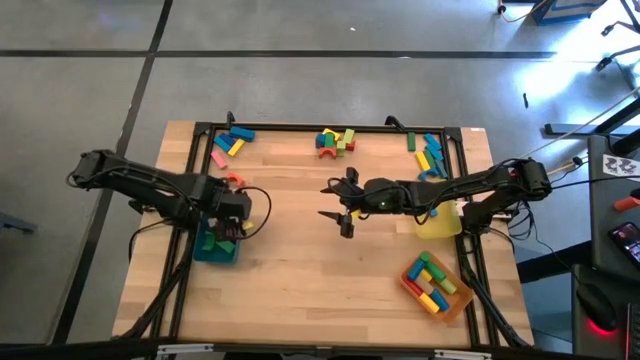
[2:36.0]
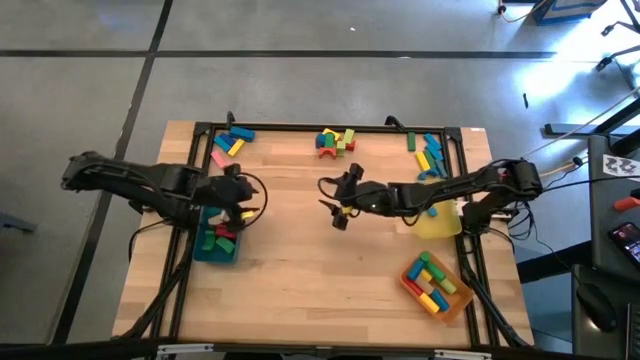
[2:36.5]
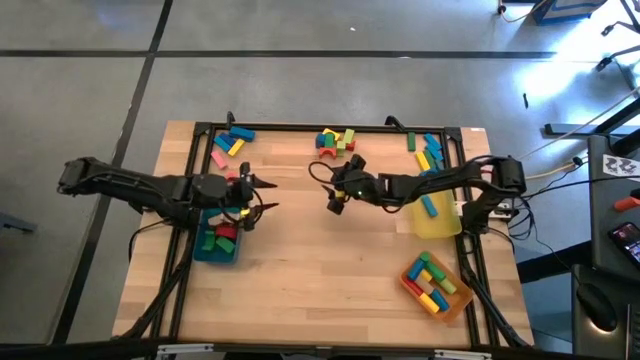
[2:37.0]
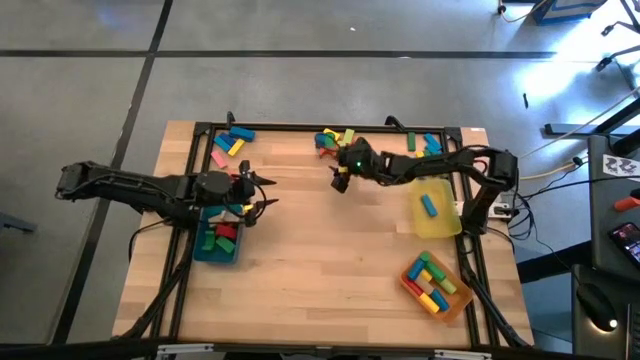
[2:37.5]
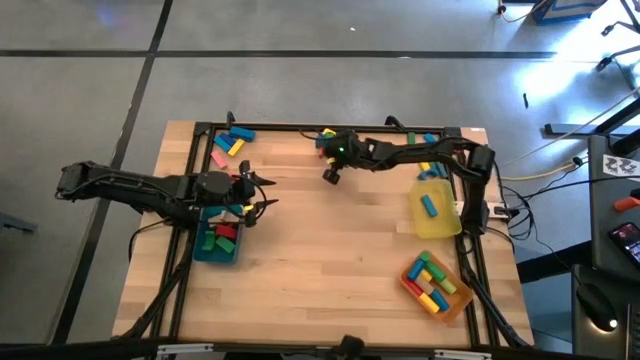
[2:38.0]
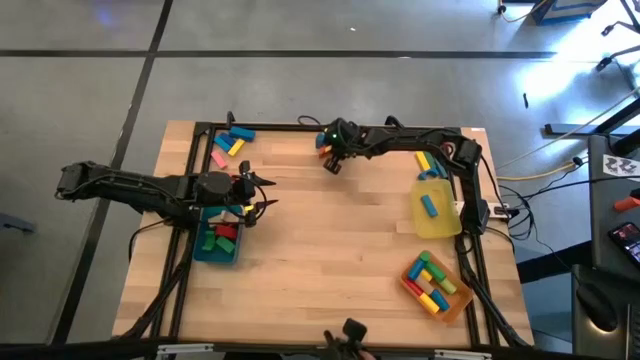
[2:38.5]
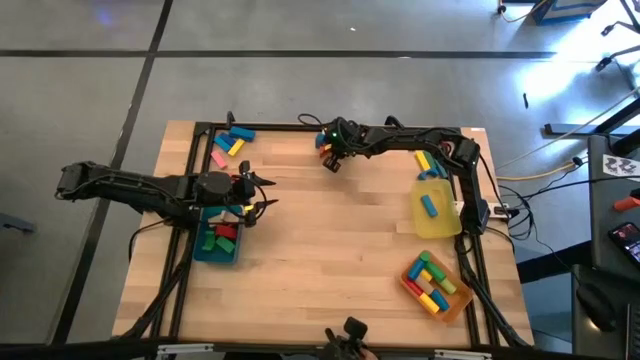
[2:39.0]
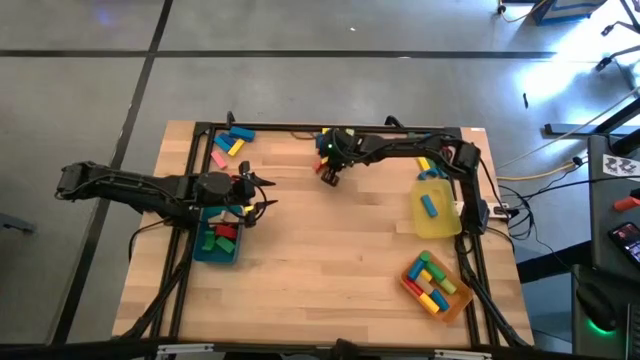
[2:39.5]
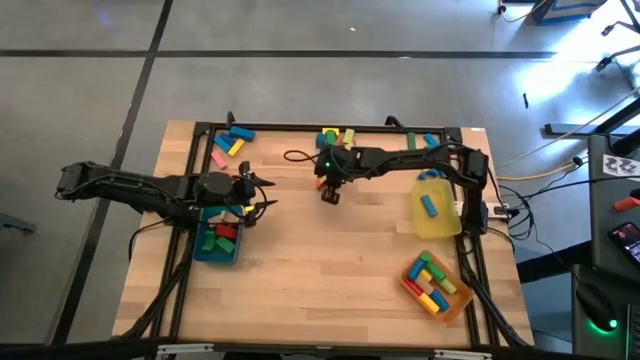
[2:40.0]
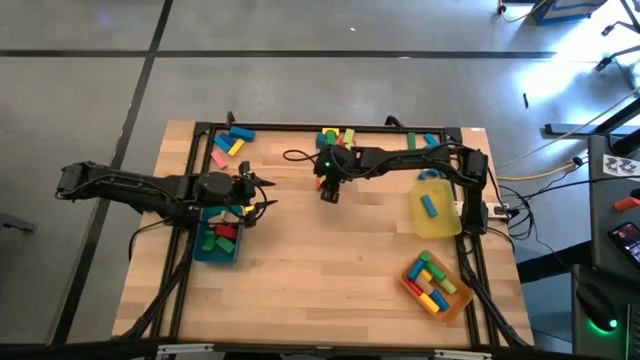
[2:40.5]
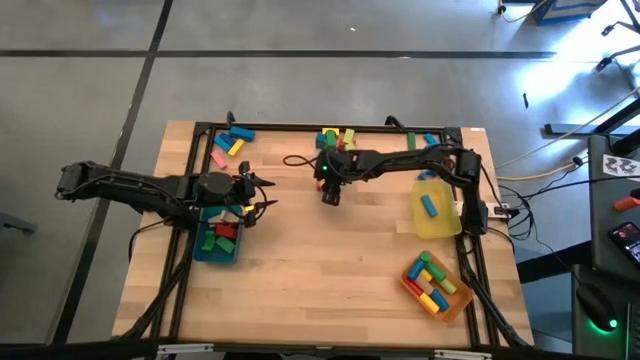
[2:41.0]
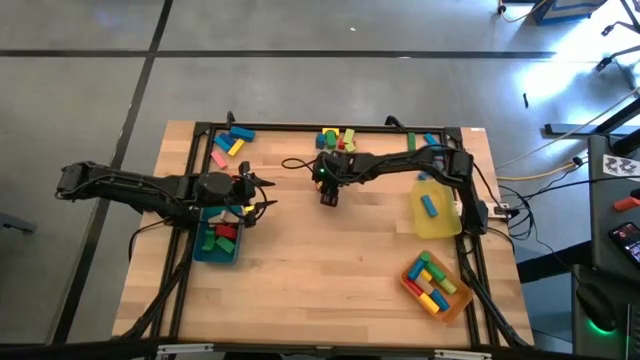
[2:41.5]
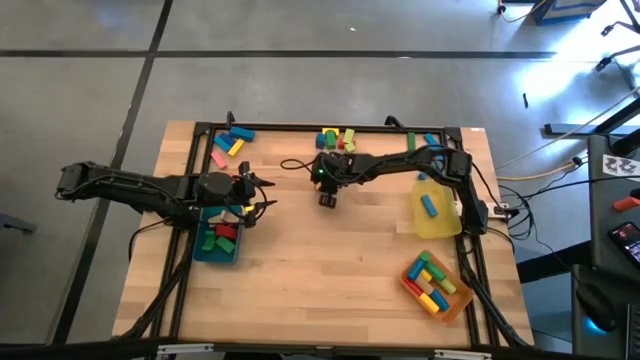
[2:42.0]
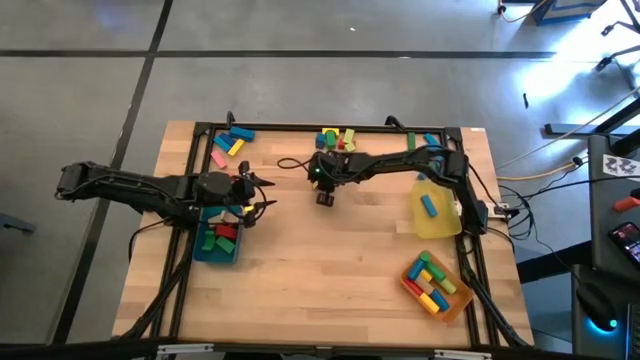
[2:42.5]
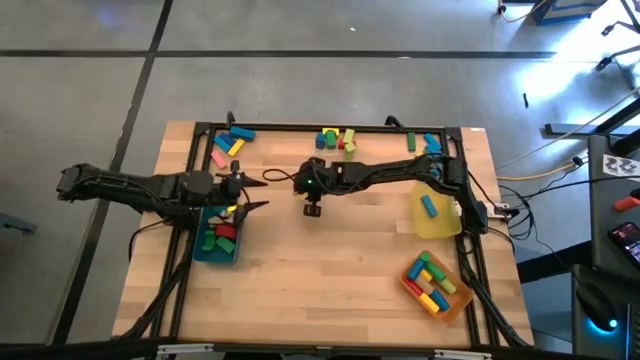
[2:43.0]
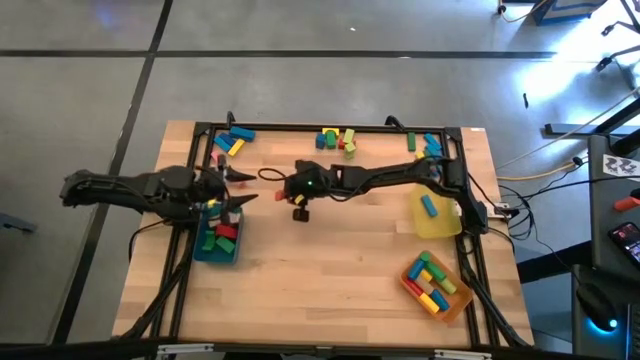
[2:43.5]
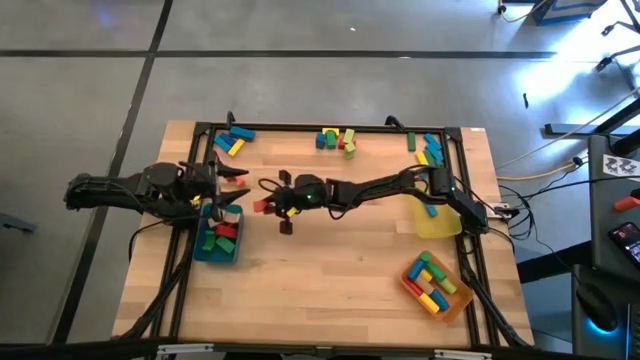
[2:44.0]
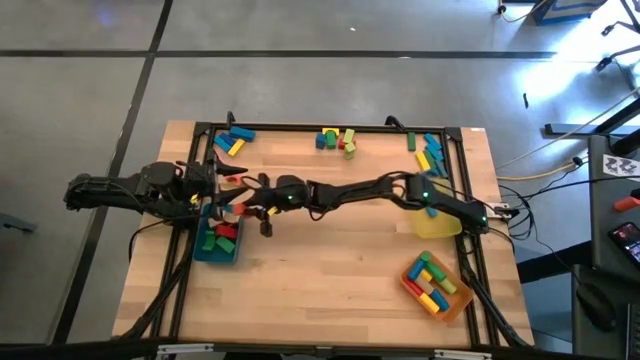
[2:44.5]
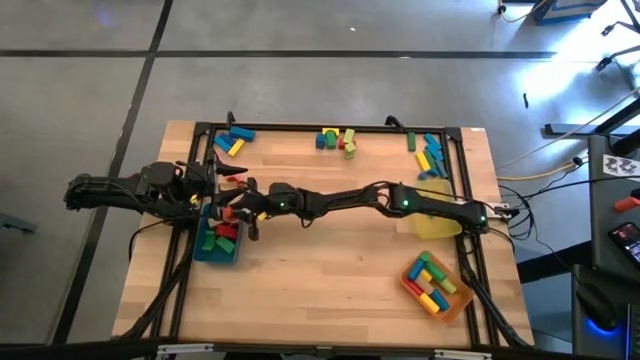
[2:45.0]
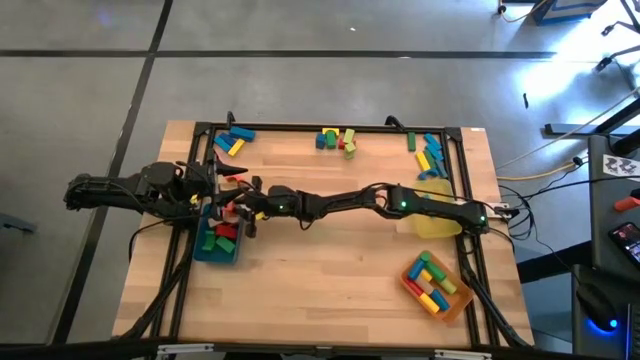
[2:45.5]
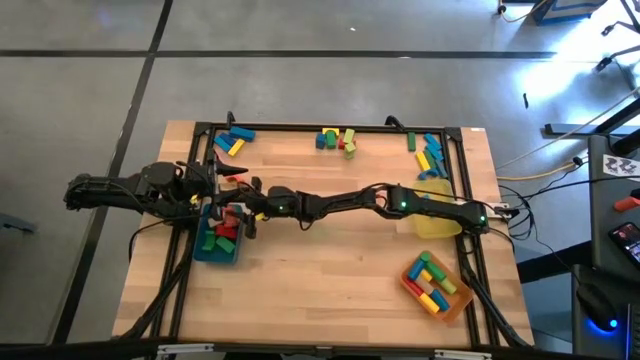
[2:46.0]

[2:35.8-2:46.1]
Task: Sort blocks by size
Put the orange arch block into the blue bin

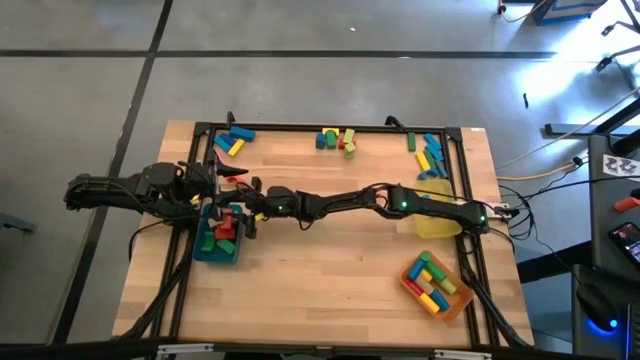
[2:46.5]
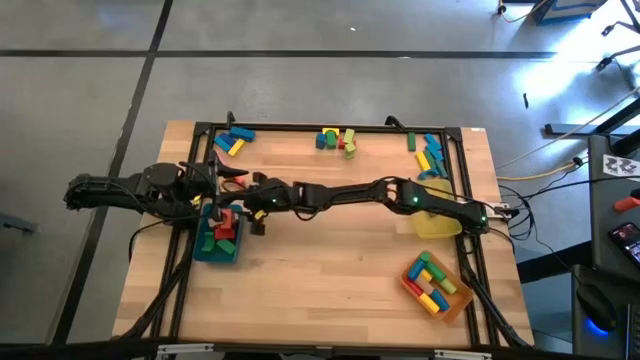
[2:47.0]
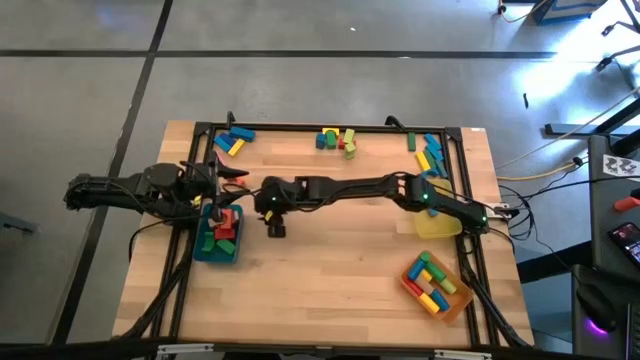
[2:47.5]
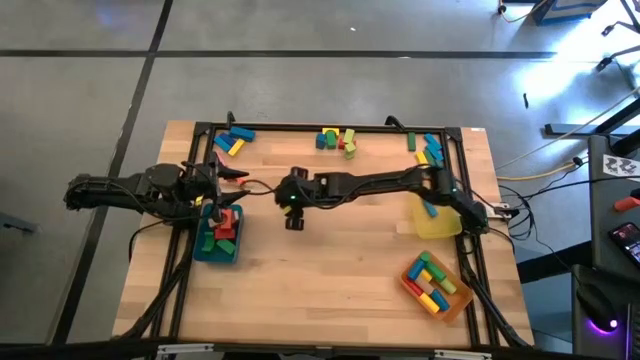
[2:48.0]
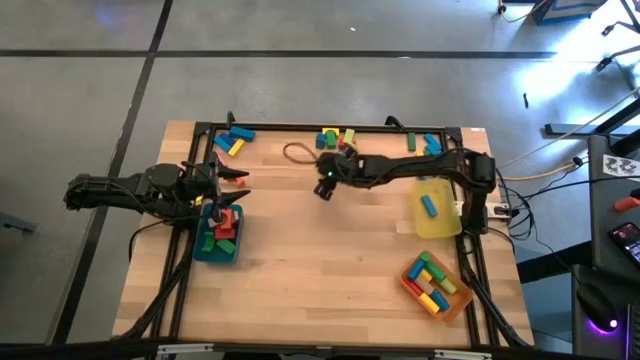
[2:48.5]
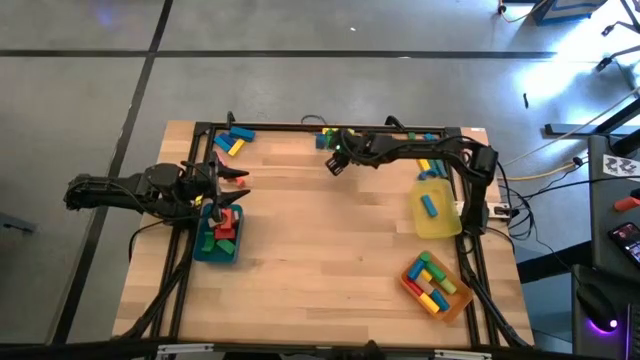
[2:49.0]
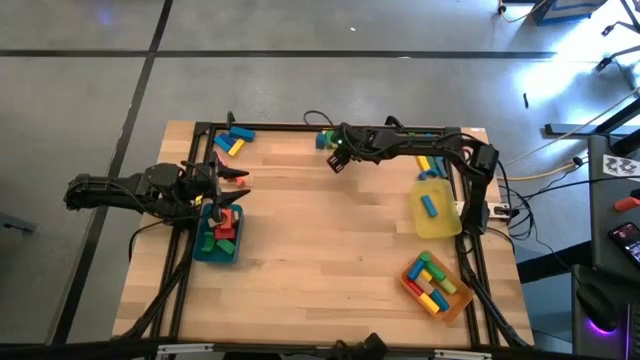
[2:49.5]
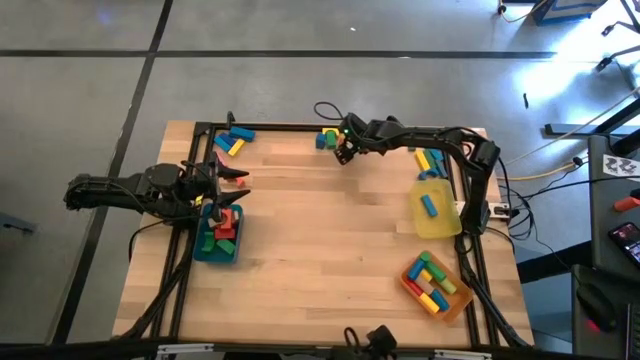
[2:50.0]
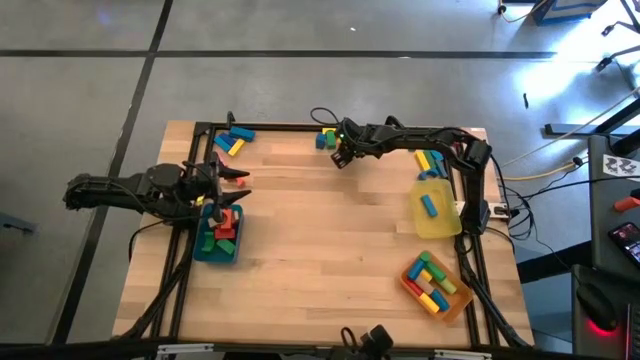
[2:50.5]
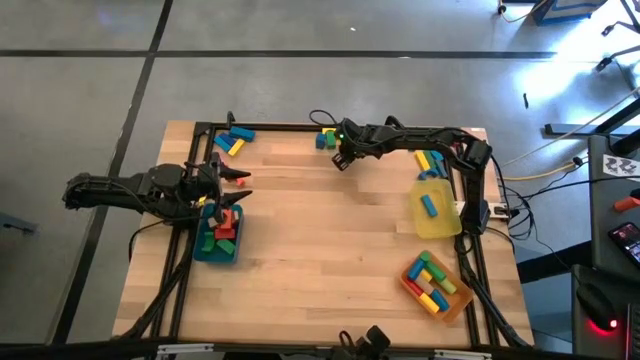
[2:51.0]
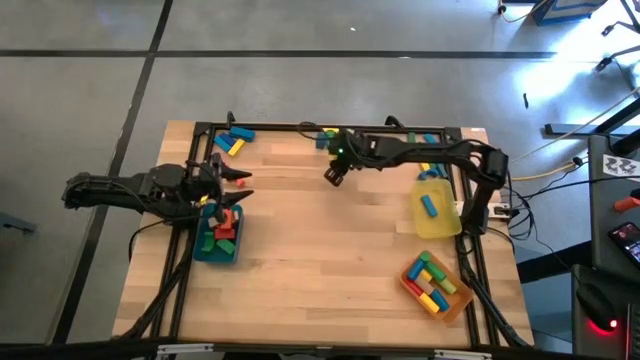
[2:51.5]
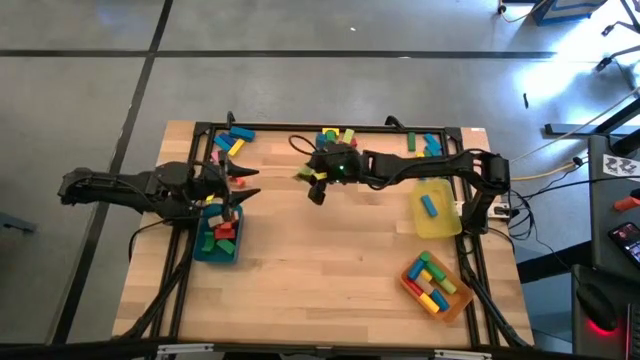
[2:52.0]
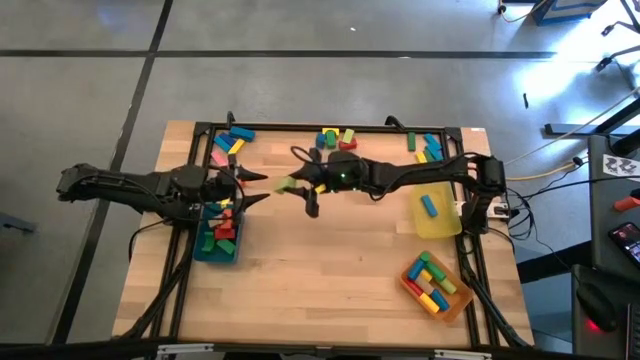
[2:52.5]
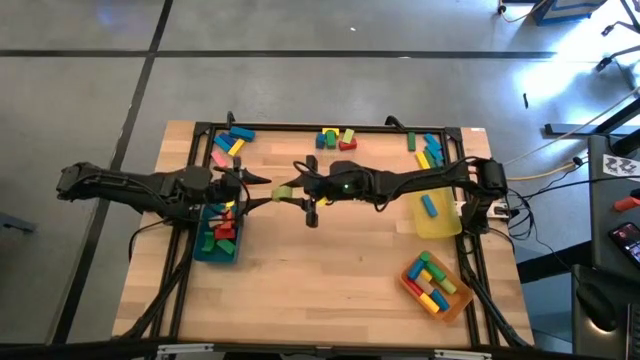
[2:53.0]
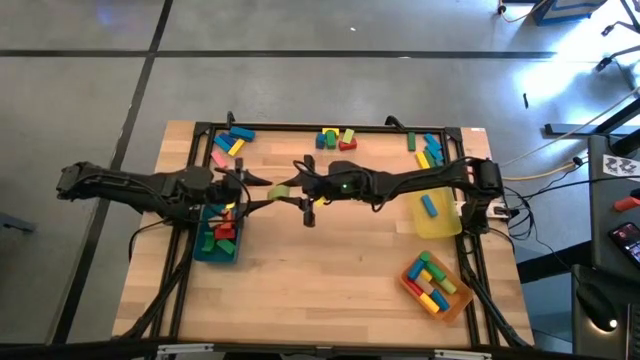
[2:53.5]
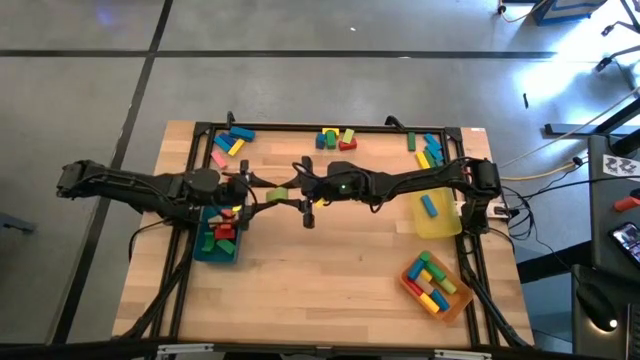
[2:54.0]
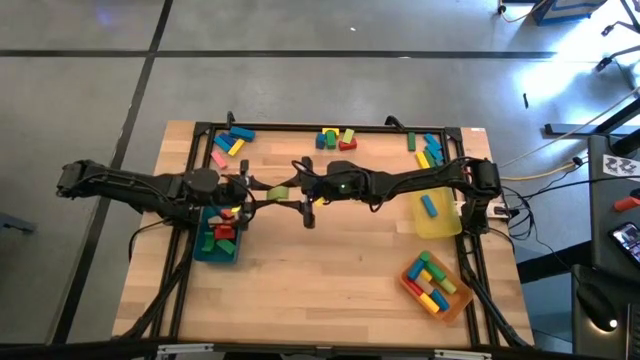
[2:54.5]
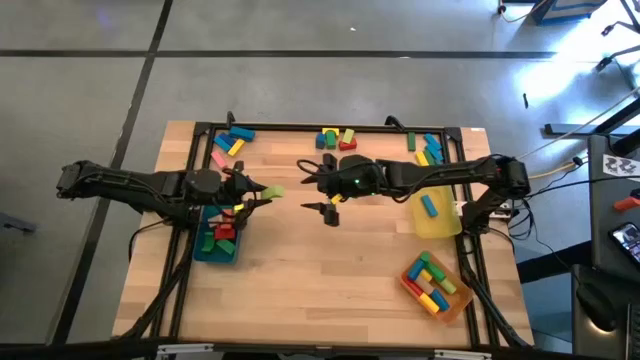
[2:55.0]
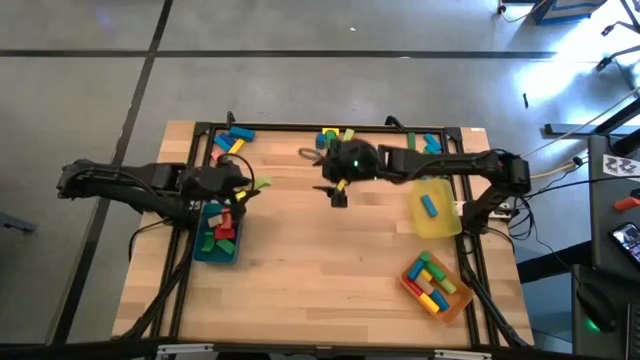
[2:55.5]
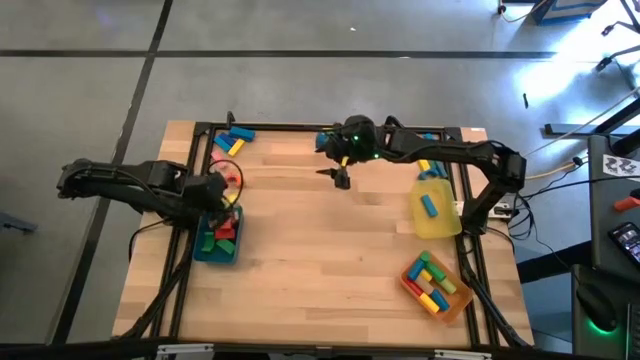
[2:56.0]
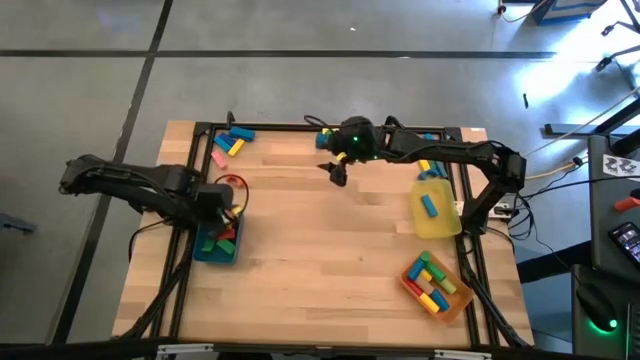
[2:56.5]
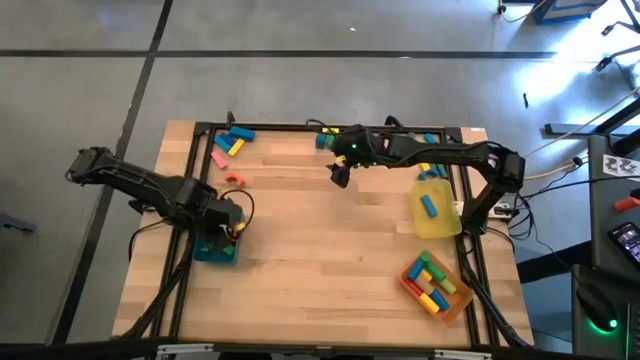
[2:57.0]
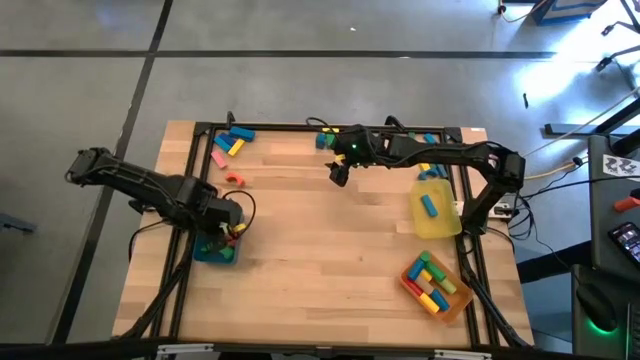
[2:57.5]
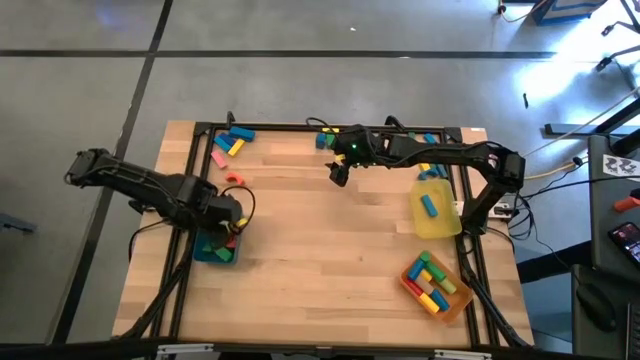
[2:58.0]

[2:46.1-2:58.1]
Put the light green cylindrical block into the blue bin
